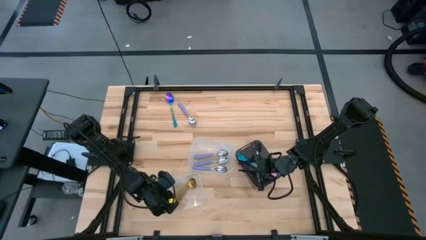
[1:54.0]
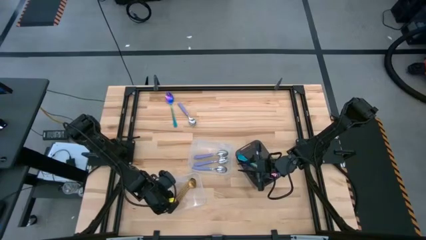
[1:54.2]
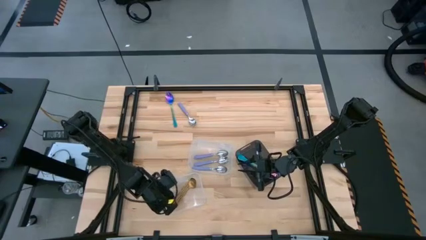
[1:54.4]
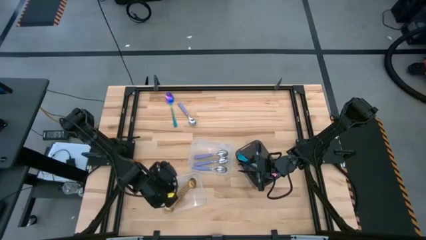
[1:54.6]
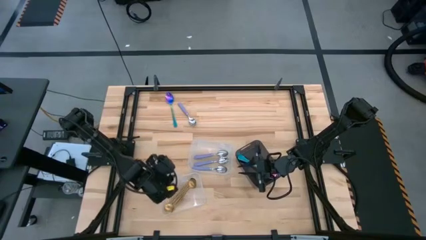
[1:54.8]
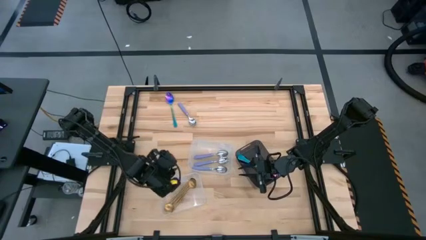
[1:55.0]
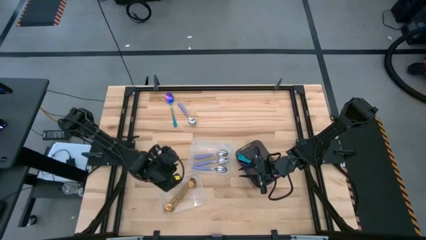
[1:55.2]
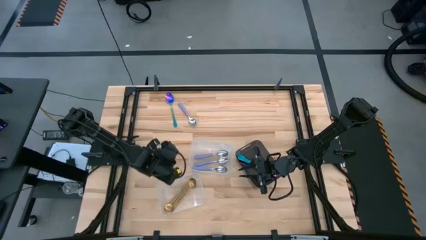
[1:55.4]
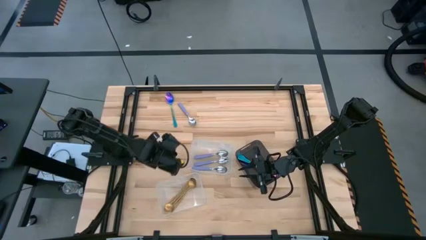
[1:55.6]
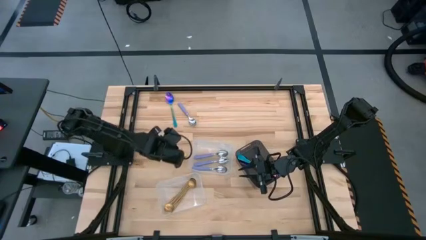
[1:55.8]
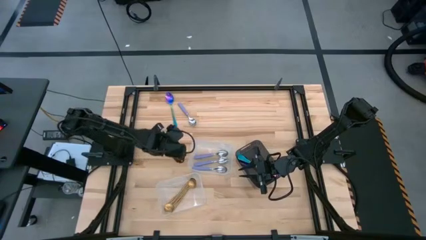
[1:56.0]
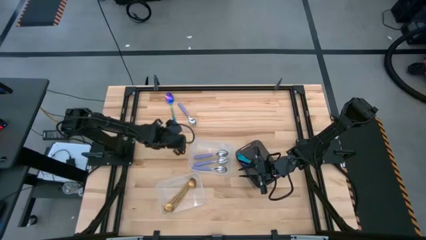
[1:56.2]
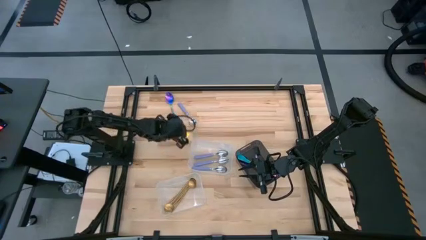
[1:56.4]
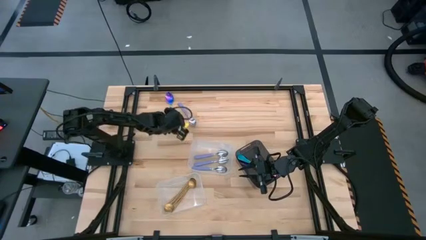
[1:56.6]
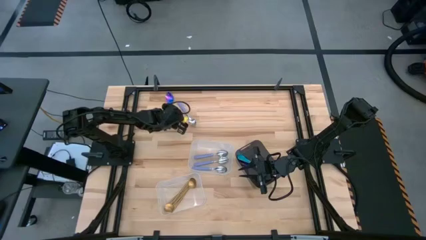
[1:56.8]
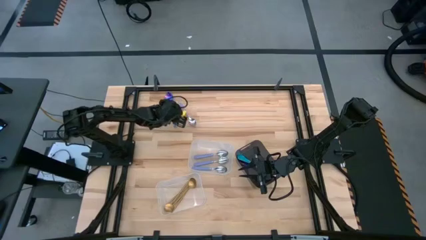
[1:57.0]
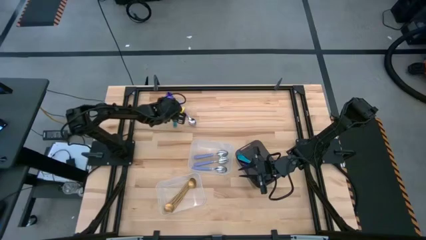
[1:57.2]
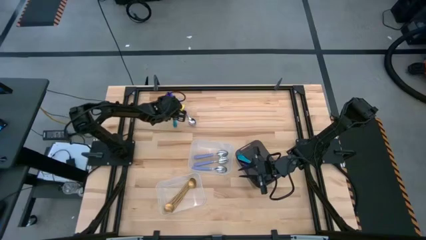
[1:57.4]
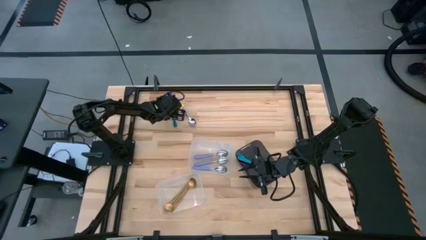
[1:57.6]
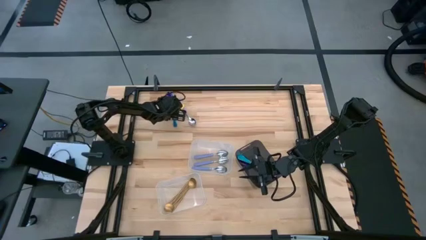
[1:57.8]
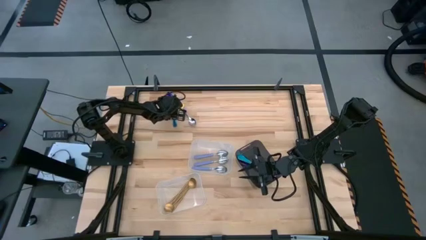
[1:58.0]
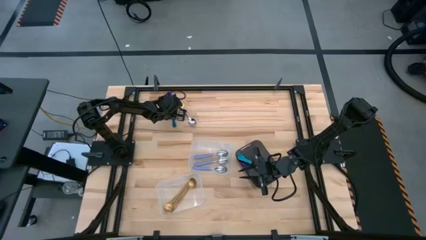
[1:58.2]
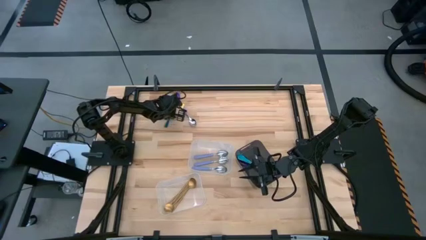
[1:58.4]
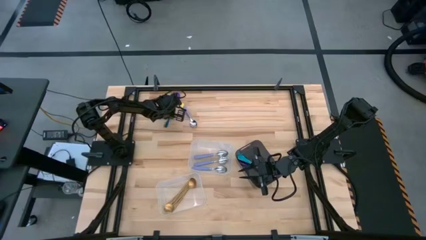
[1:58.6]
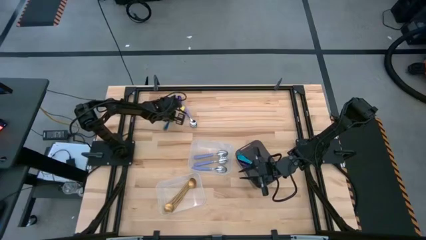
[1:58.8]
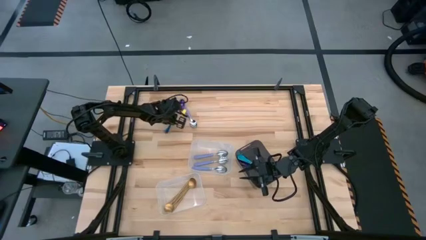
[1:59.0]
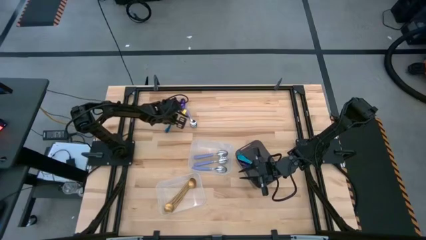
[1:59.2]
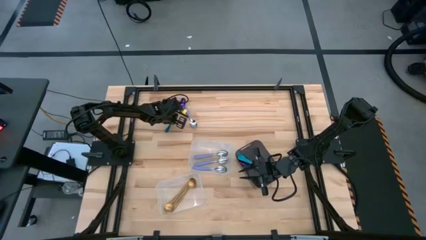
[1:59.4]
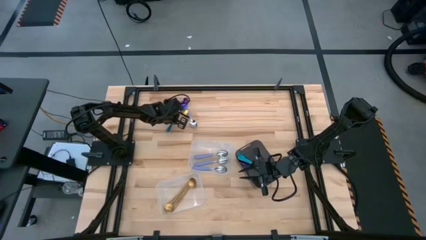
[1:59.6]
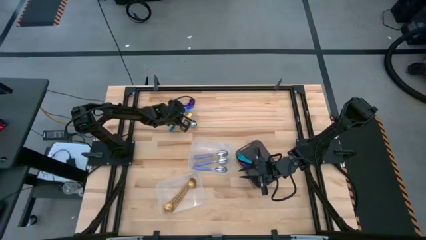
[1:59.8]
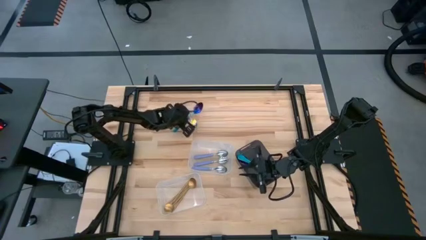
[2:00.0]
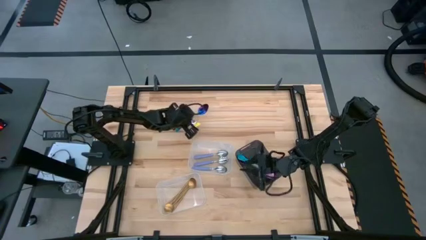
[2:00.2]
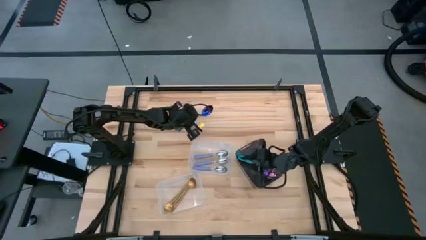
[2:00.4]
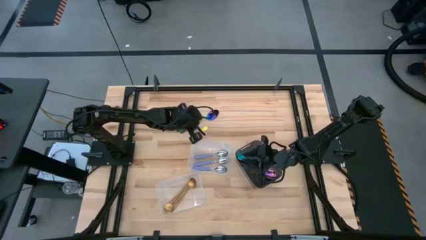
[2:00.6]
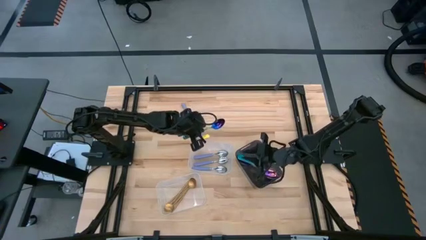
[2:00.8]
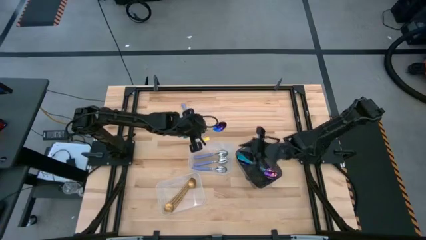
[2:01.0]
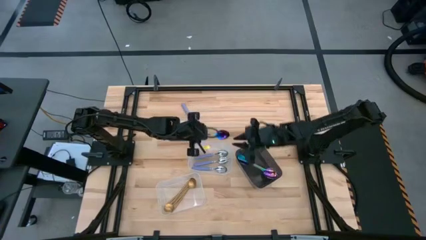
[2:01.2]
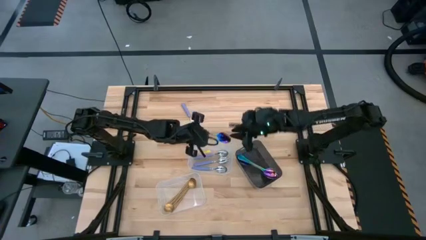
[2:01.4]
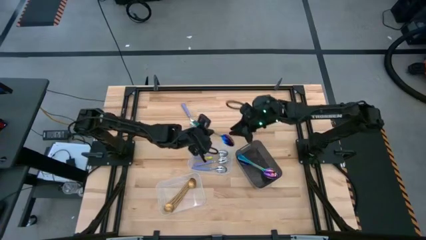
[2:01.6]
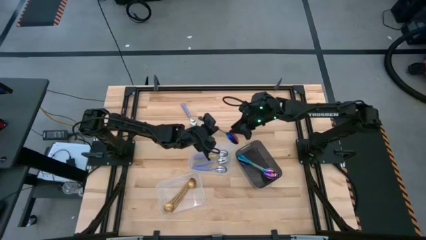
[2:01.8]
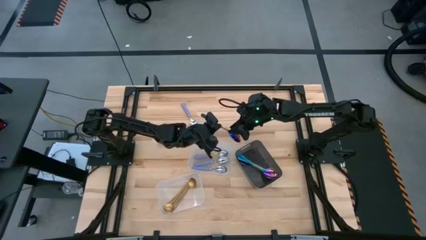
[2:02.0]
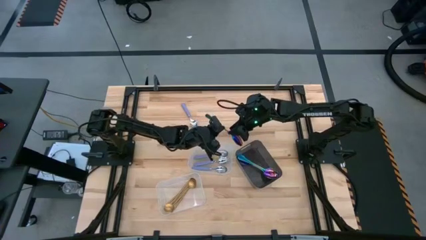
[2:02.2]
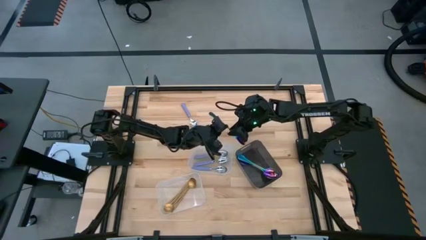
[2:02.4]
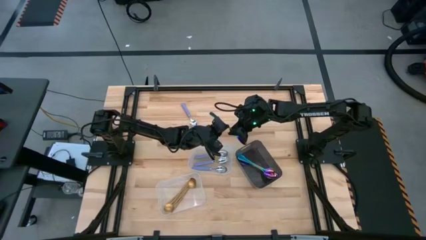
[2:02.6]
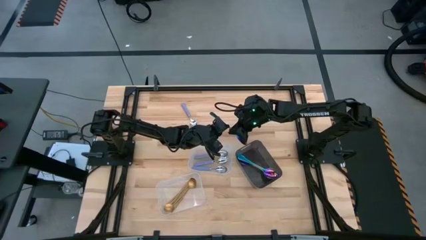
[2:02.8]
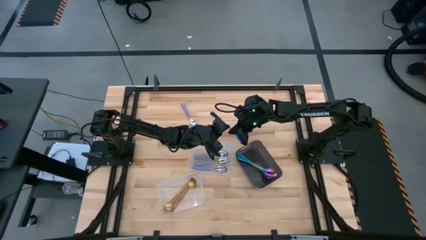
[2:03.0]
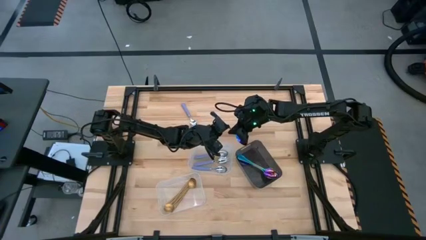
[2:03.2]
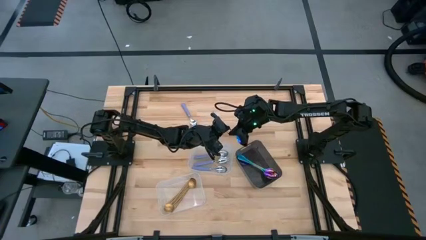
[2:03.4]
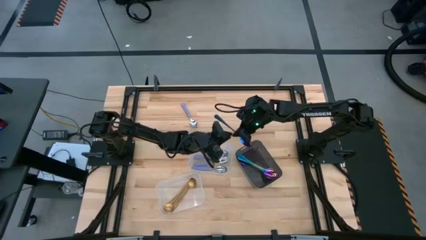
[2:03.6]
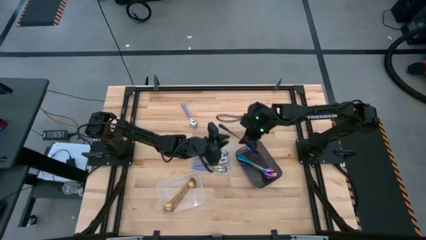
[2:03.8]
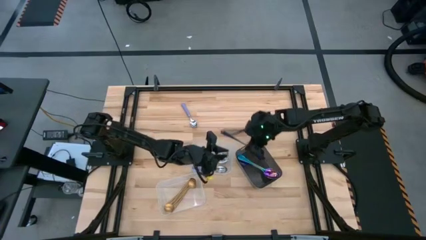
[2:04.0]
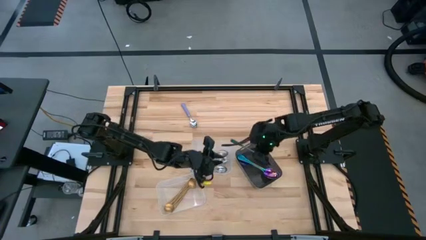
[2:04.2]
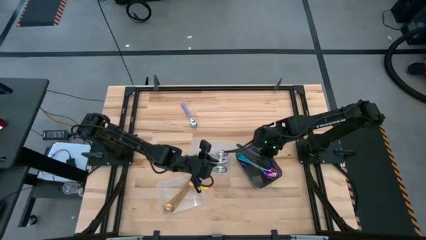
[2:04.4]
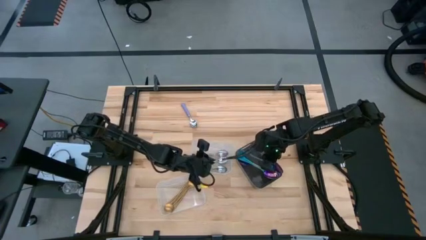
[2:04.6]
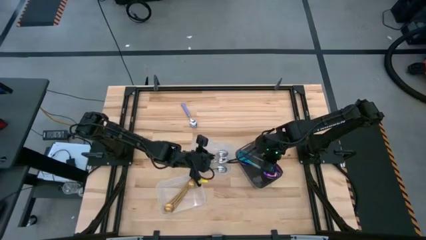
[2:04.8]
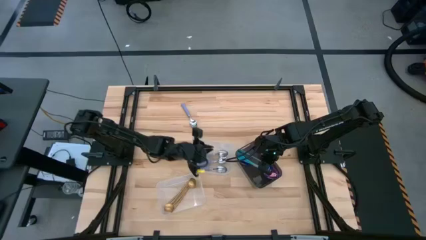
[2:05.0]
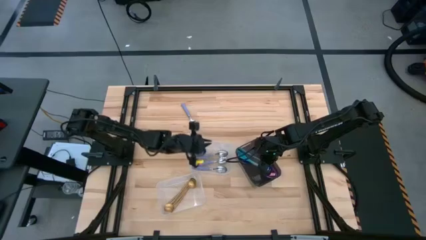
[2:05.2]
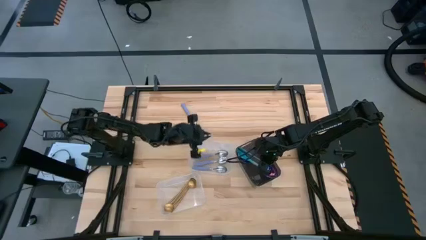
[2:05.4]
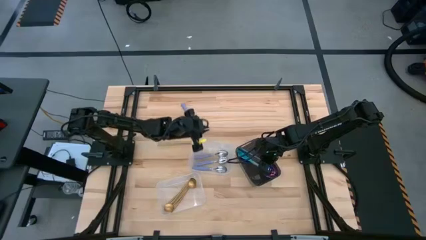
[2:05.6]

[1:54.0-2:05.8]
Task: Sort silverware by color (type)
Put the violet spoon into the black bin

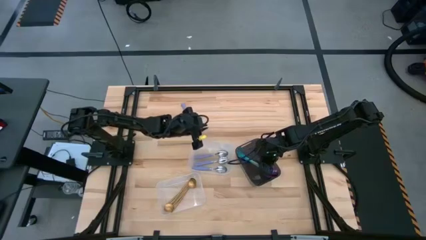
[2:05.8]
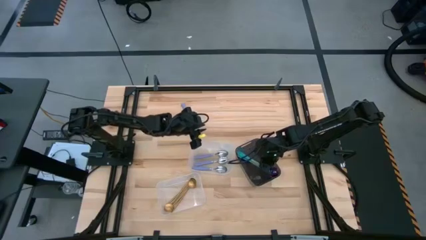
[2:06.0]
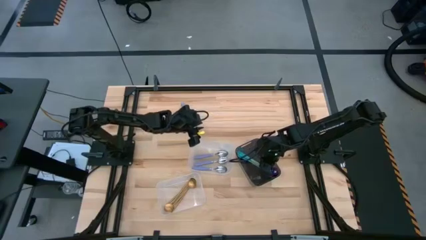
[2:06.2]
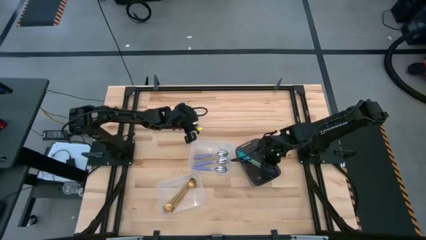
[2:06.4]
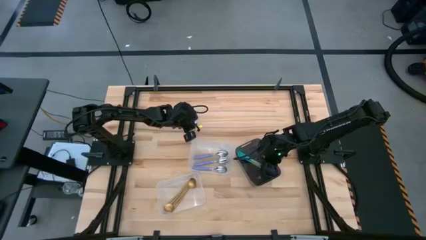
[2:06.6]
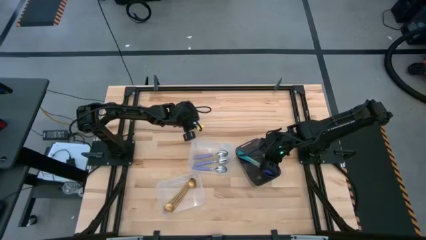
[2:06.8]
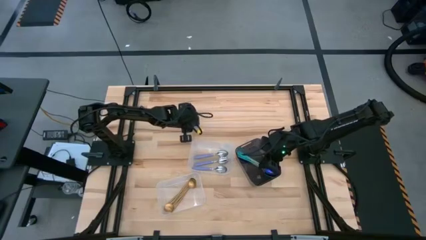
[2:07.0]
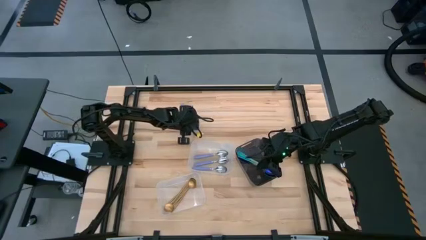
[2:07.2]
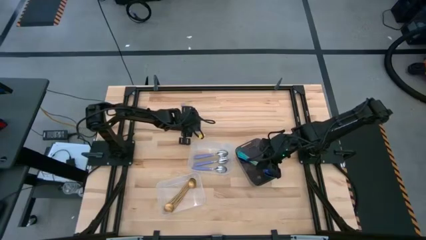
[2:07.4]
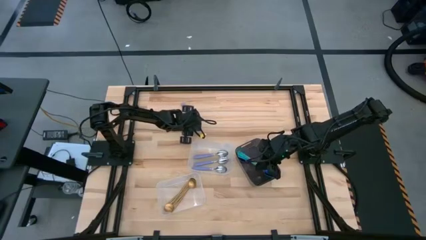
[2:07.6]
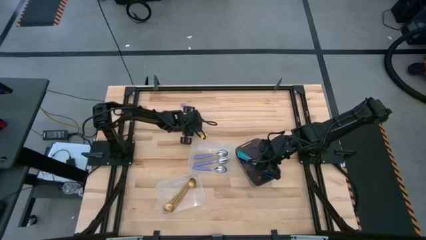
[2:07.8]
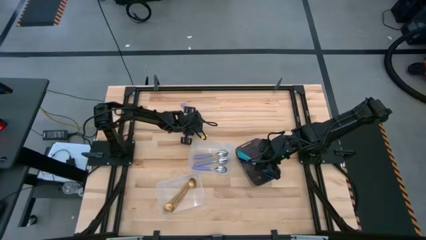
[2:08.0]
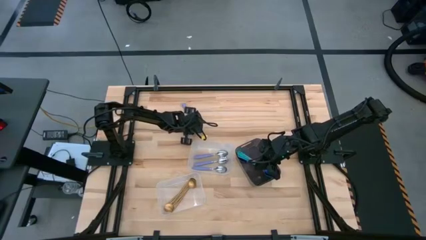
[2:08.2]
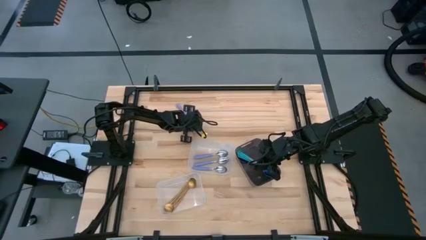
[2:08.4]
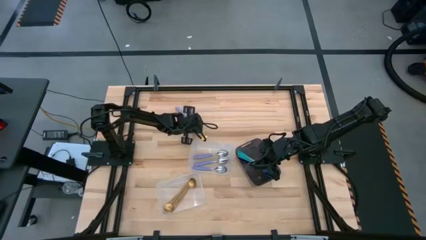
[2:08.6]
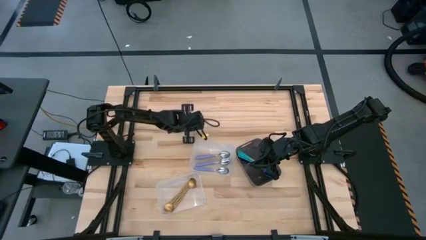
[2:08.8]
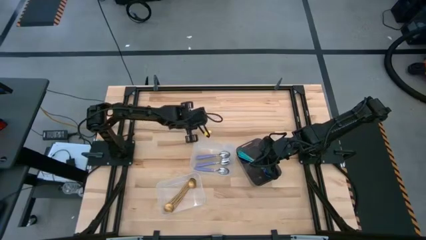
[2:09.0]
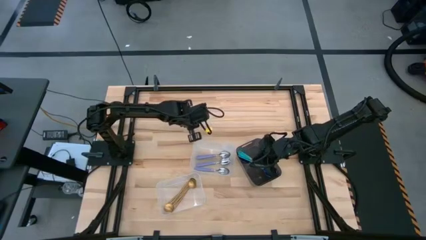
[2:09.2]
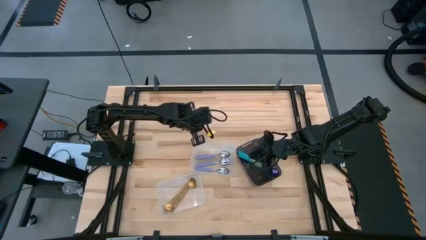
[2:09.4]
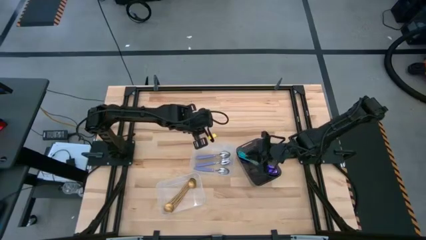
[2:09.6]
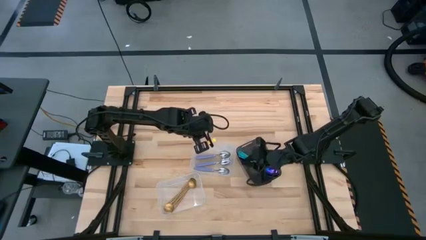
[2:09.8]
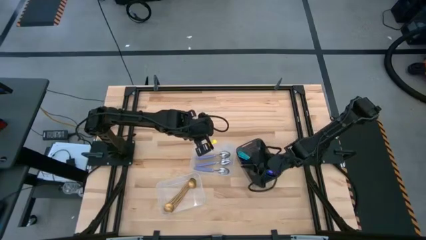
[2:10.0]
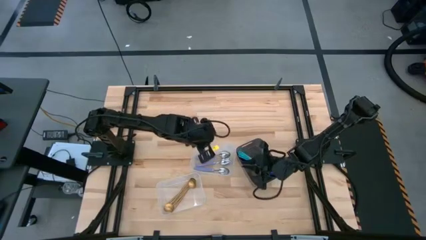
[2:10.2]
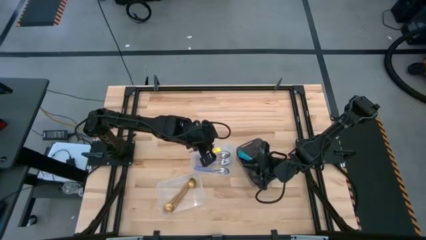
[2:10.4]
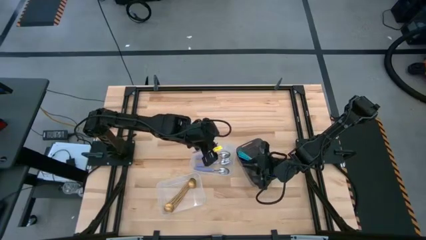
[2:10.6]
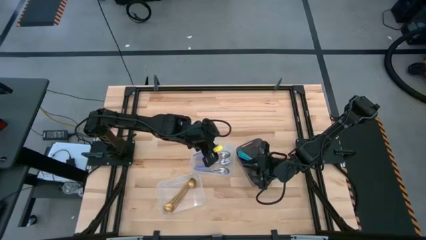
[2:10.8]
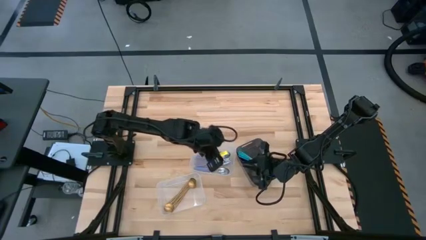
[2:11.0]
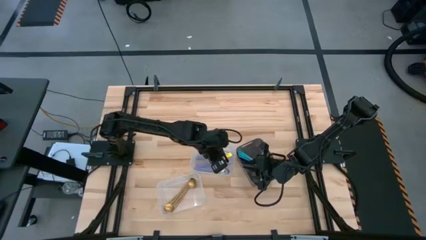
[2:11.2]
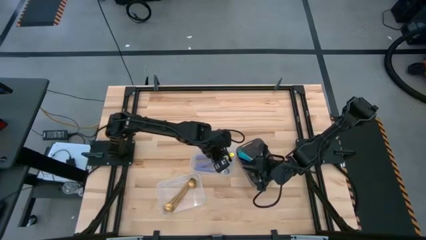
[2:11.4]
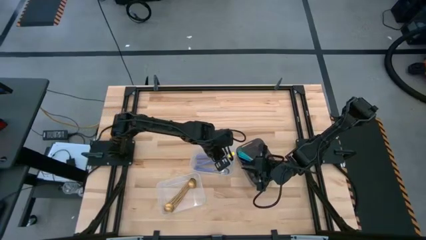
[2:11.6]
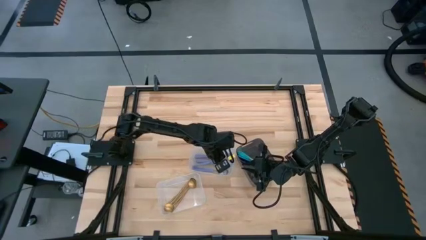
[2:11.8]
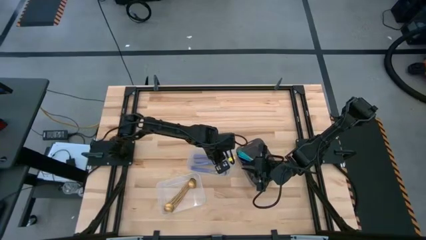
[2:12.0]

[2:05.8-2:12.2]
Put the blue spoon into the top transparent bin
